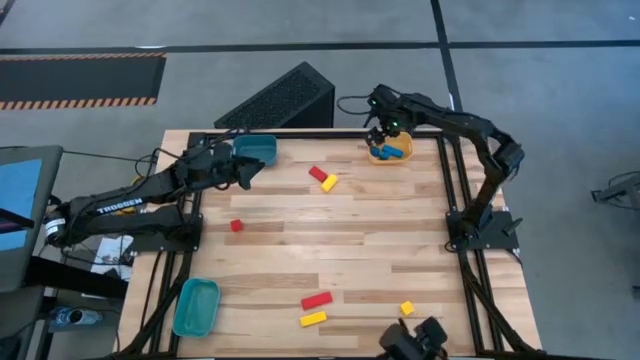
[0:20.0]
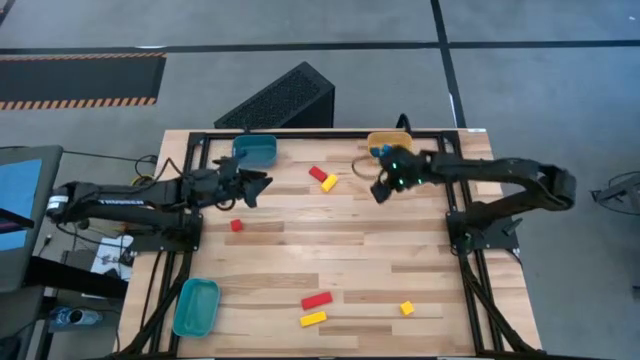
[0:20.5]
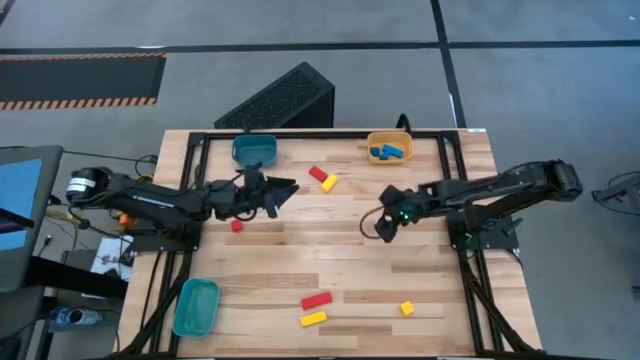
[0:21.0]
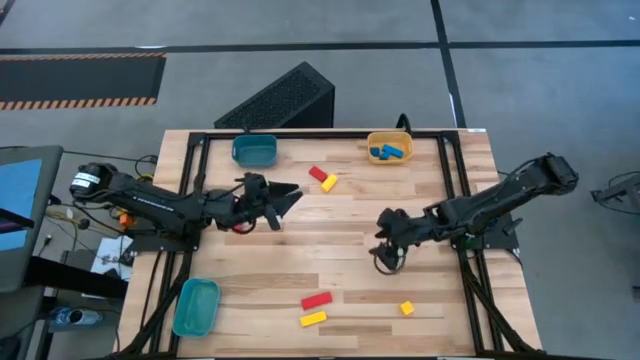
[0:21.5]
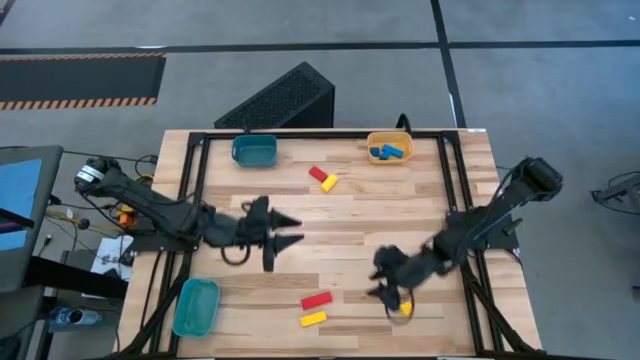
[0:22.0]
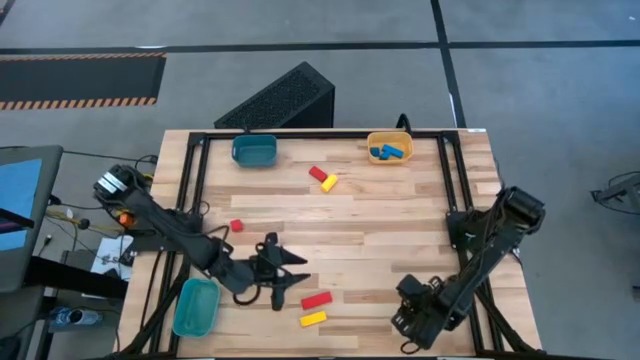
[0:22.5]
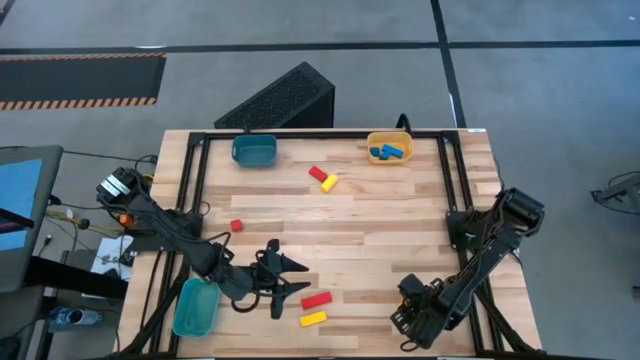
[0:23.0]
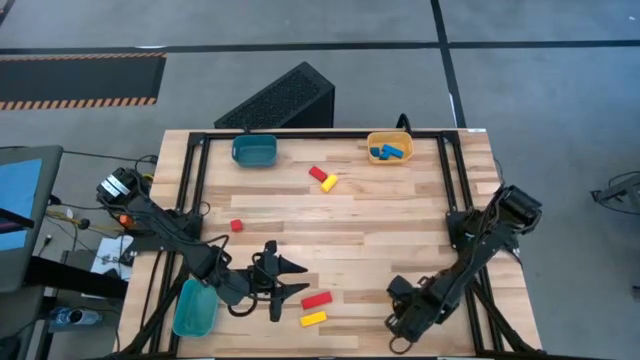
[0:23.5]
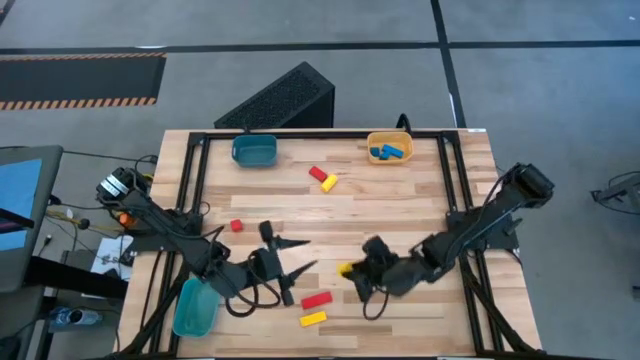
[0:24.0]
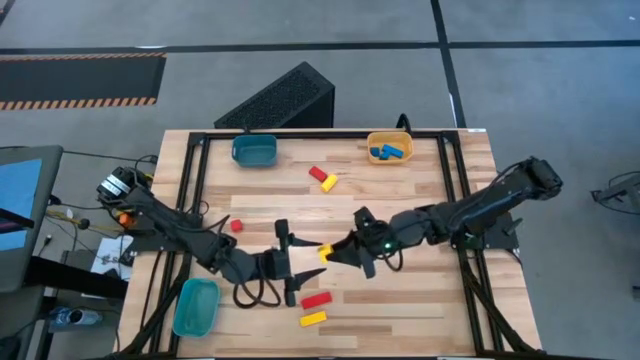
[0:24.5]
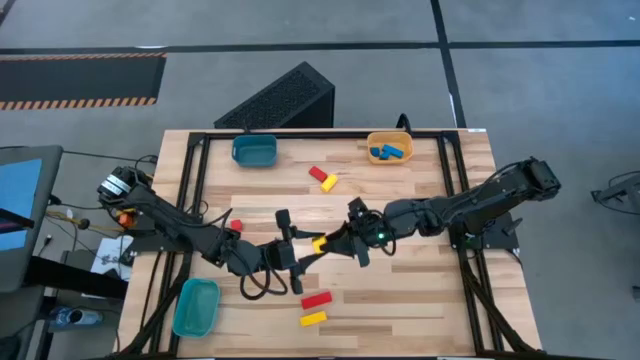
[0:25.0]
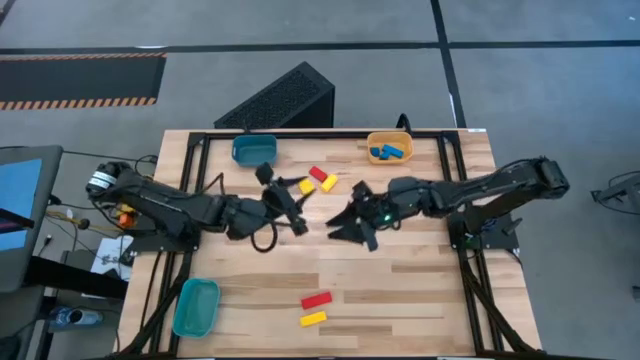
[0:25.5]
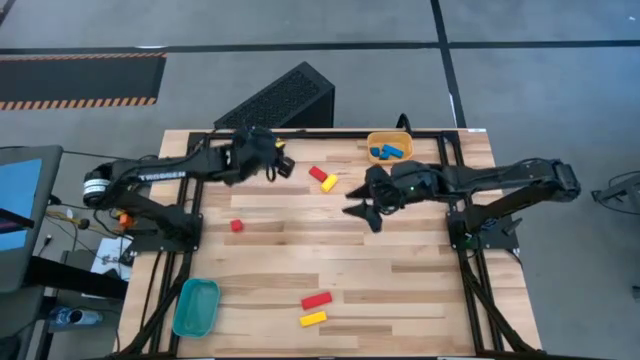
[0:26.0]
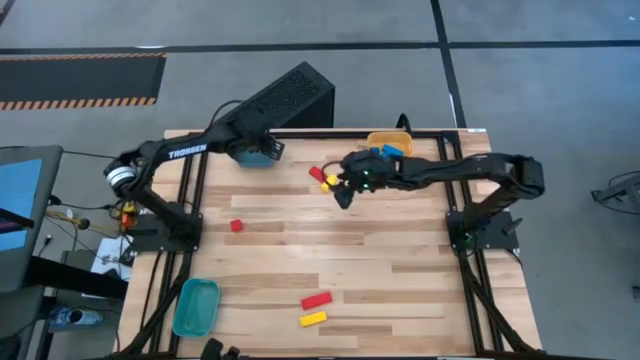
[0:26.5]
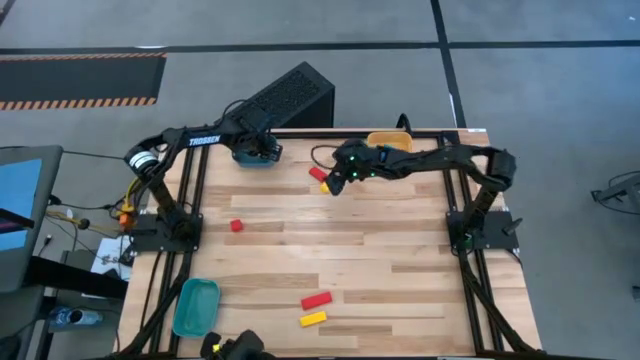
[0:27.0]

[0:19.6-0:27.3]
Task: Sort & place blocks by color
Put the bottom right yellow block into the green bin

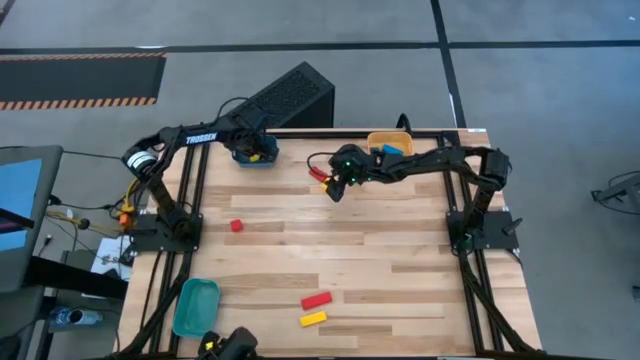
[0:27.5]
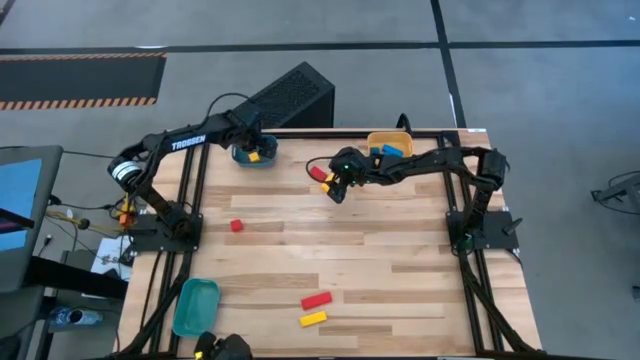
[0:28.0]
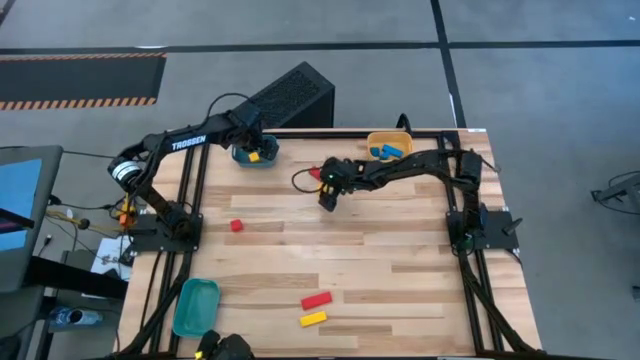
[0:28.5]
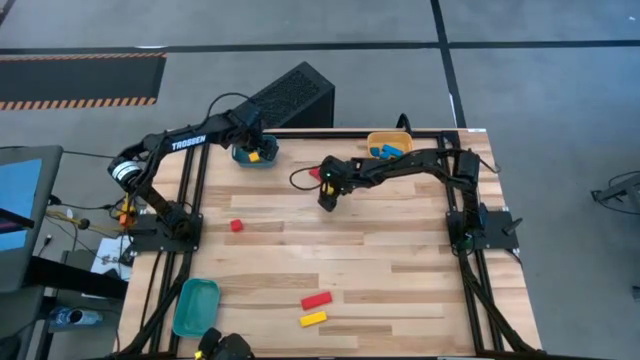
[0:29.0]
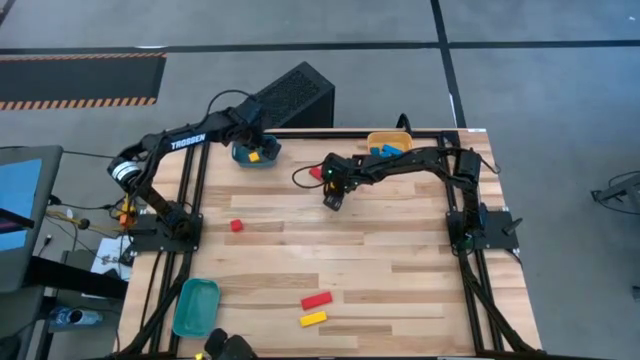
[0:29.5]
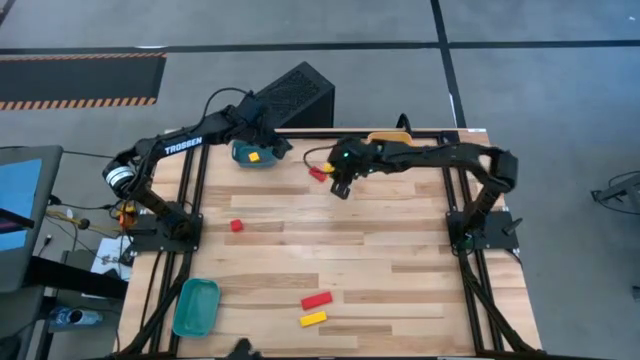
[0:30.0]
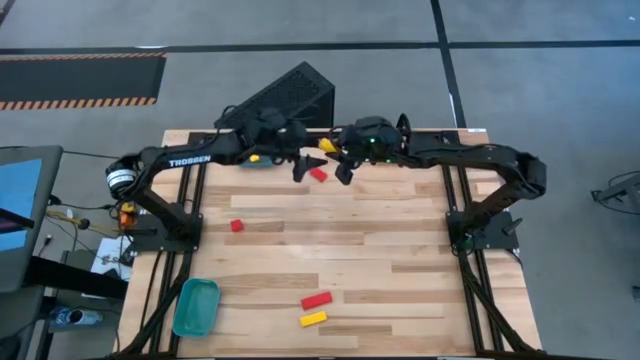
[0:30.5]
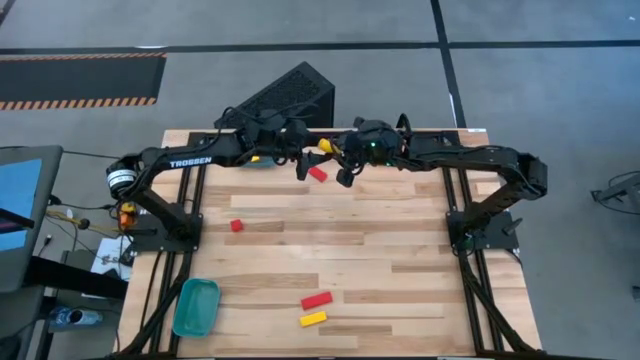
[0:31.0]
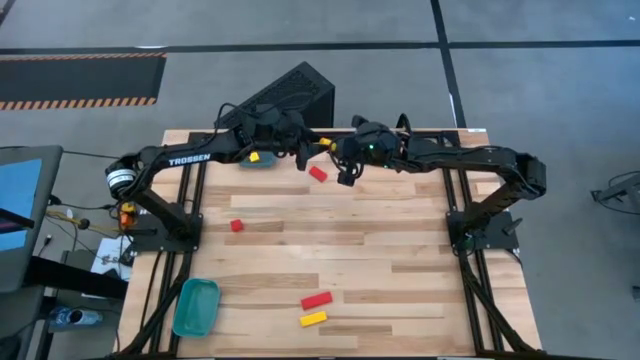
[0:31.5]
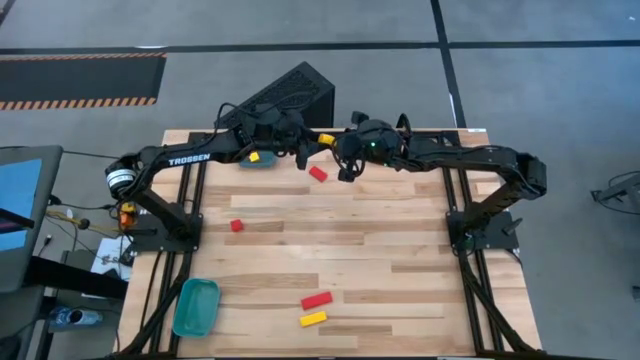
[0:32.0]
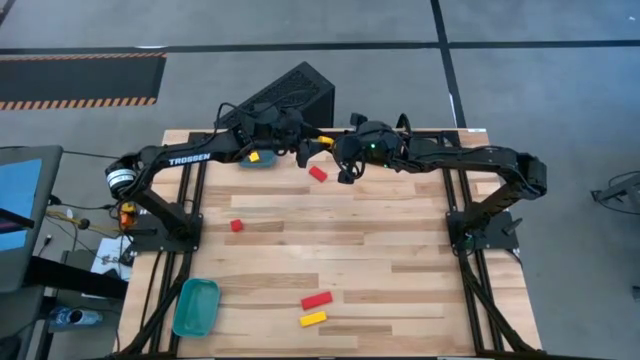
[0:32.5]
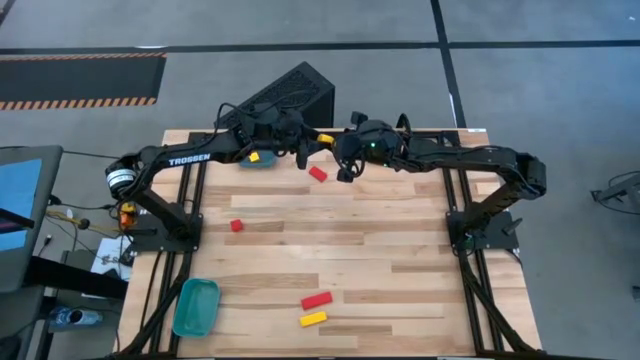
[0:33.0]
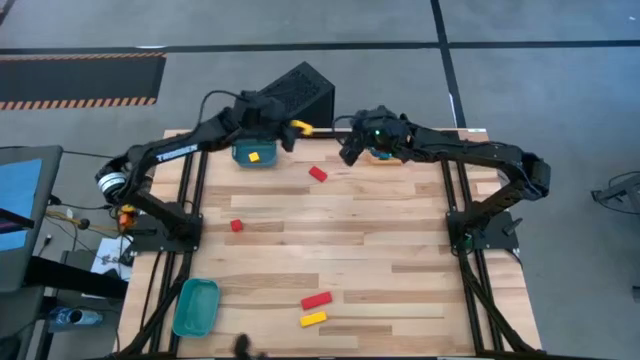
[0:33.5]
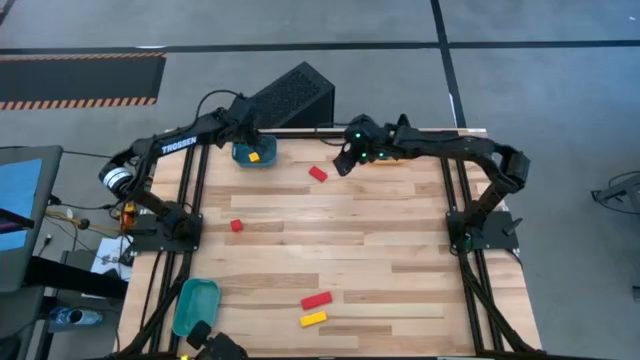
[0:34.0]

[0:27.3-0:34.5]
Put the top yellow block into the green bin

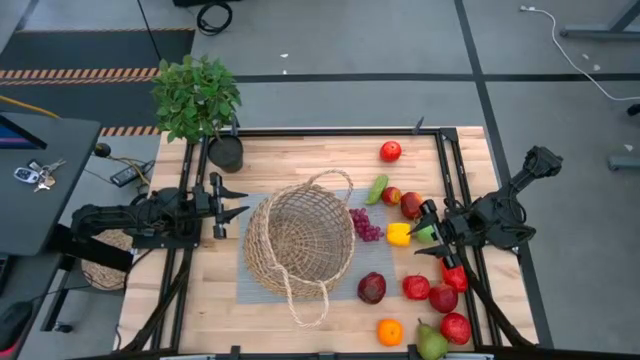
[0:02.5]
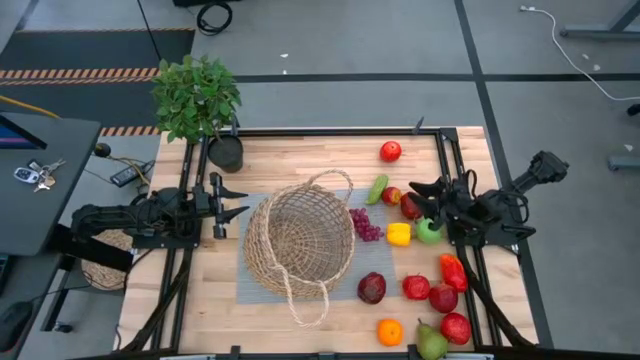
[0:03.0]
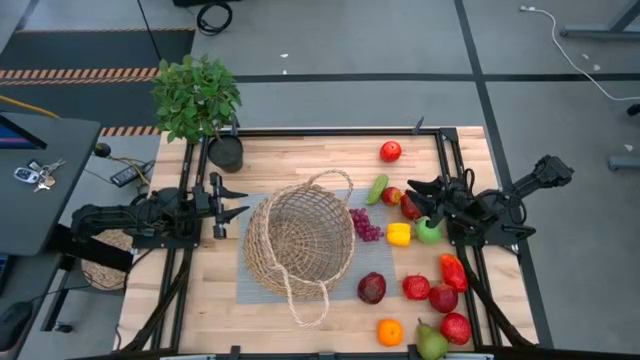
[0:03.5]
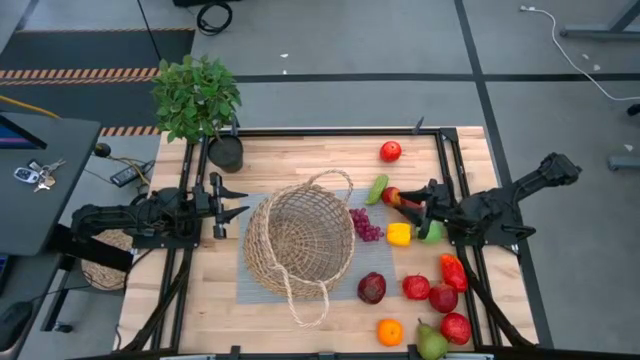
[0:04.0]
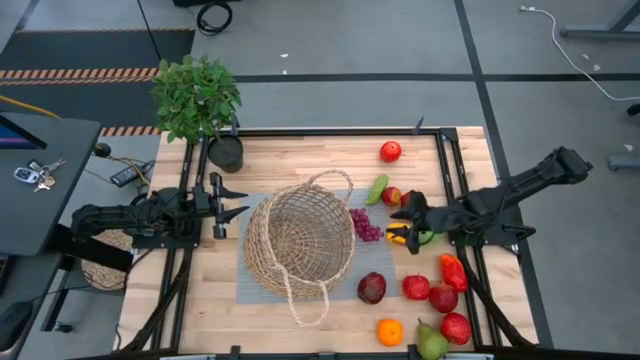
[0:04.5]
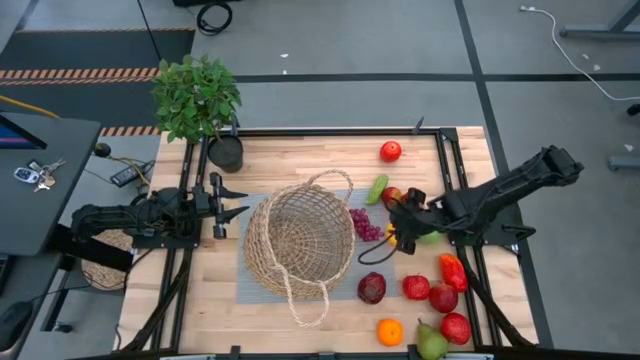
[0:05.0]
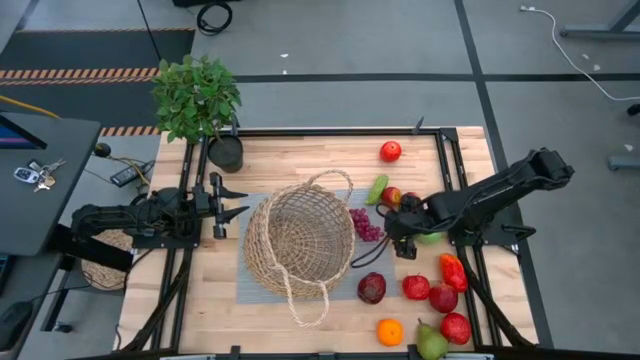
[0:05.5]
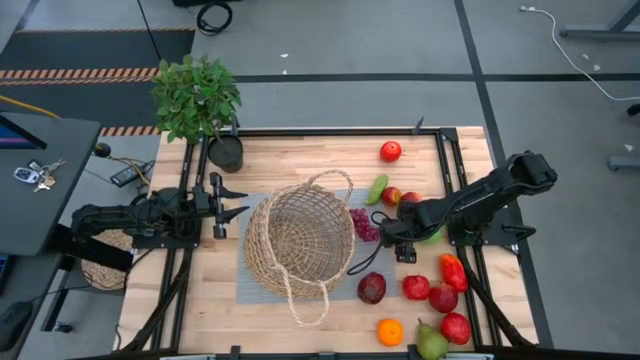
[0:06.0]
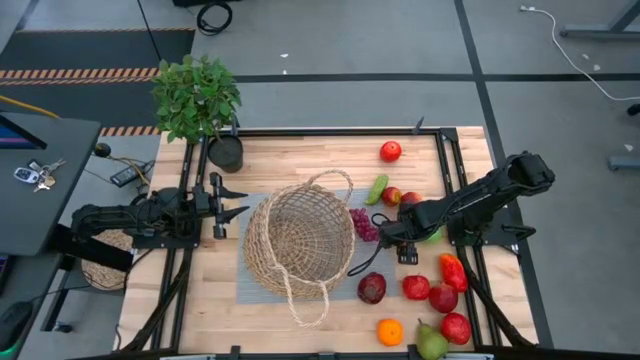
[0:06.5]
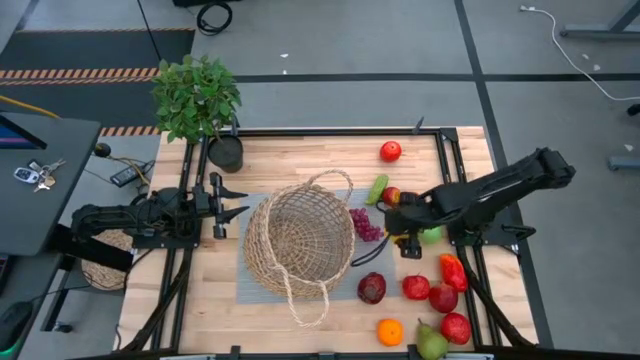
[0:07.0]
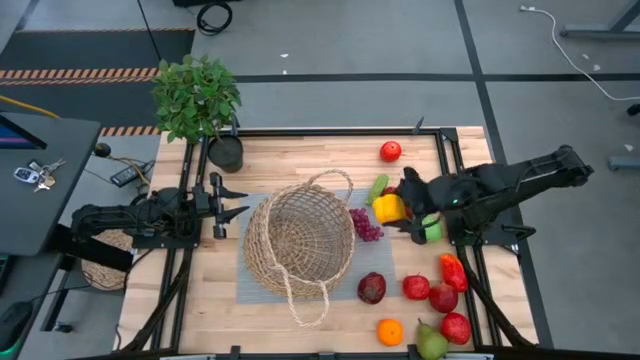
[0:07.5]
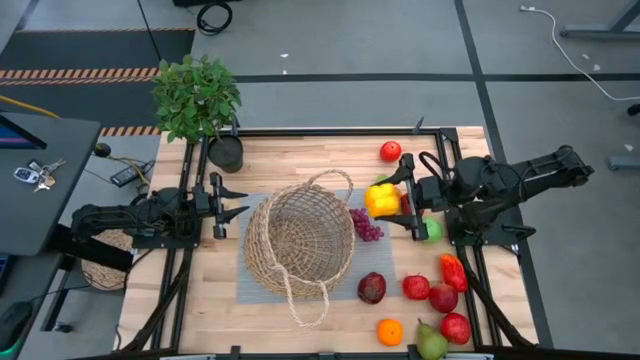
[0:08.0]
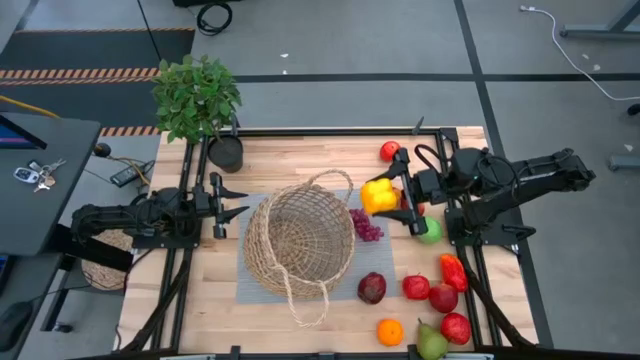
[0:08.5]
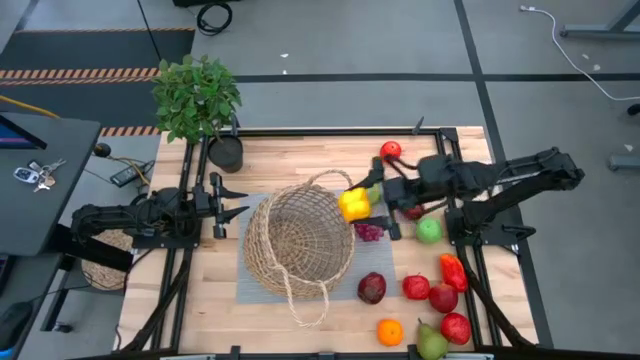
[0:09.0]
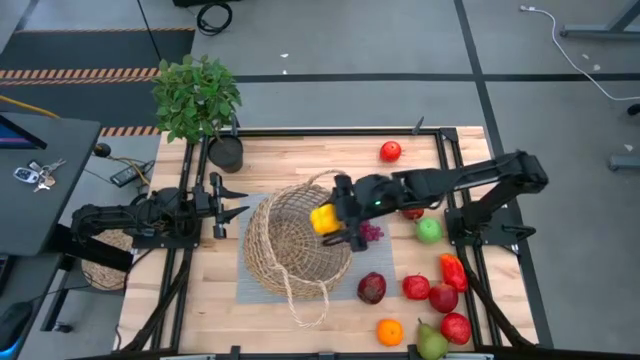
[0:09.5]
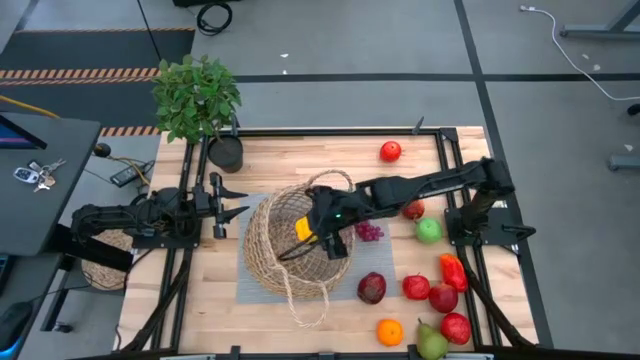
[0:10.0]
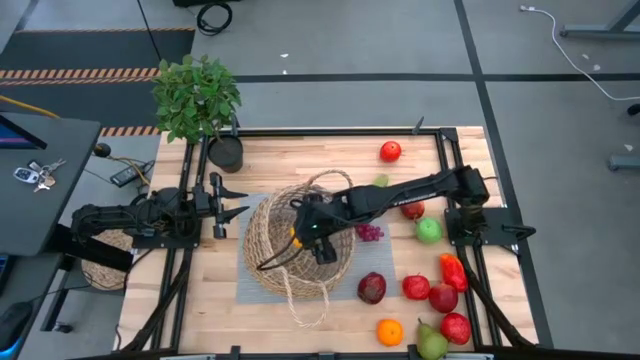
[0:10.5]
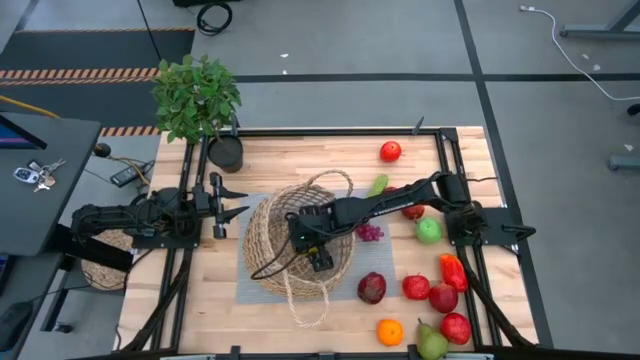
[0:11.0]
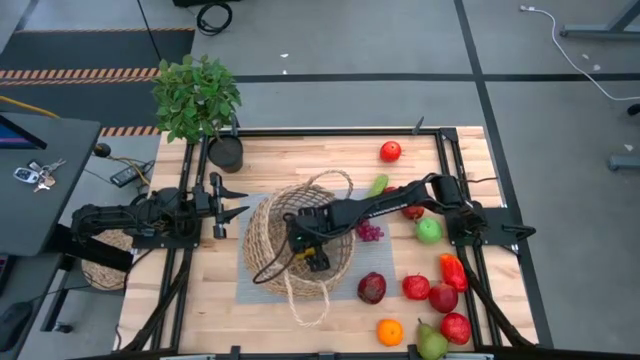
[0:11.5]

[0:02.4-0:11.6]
Task: Build produce basket
Put the bell pepper in the basket
